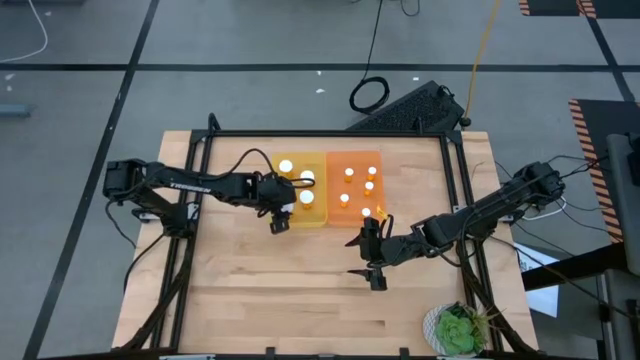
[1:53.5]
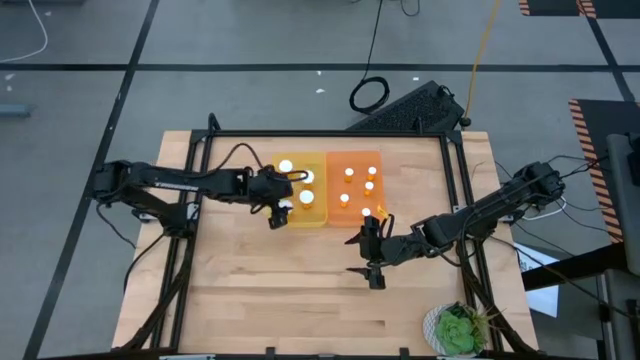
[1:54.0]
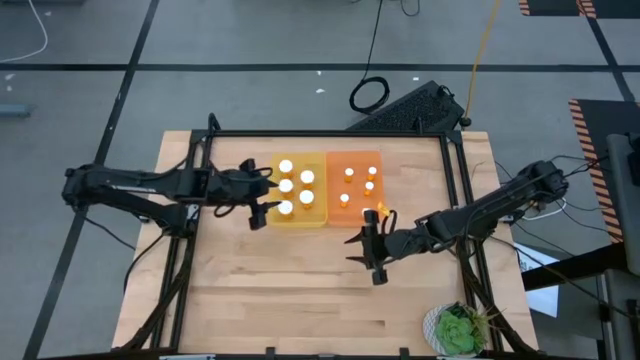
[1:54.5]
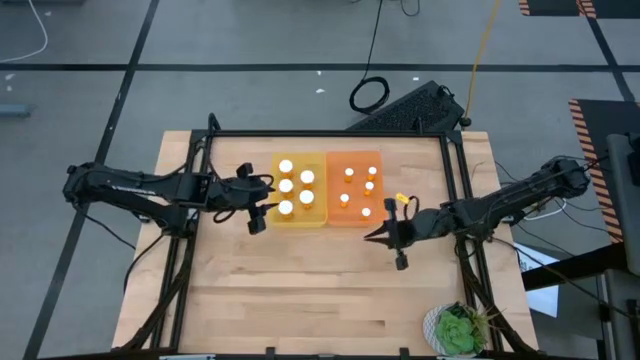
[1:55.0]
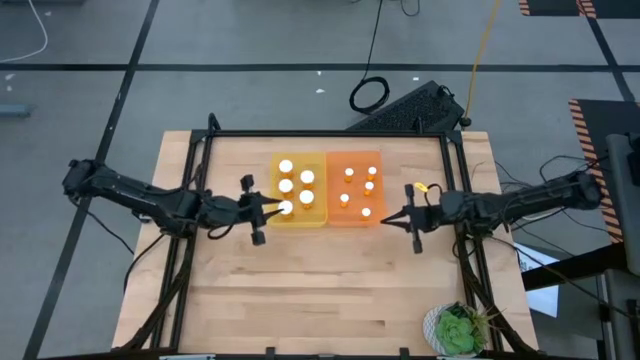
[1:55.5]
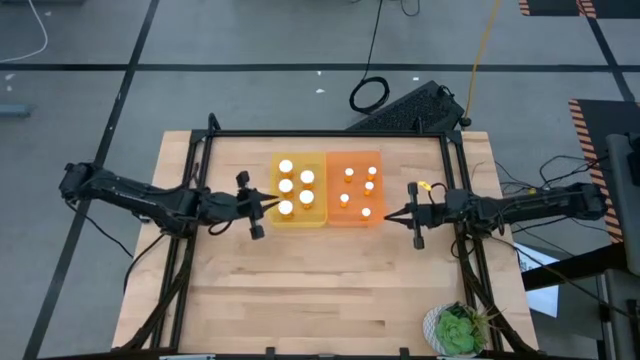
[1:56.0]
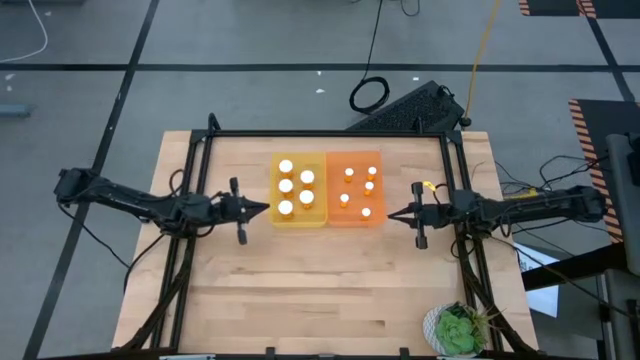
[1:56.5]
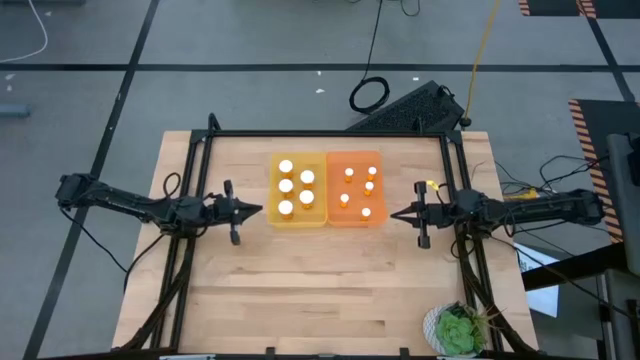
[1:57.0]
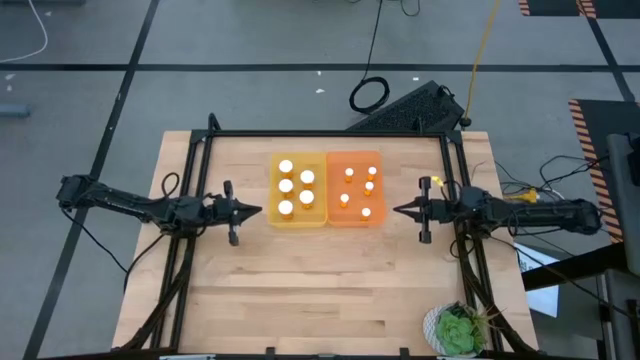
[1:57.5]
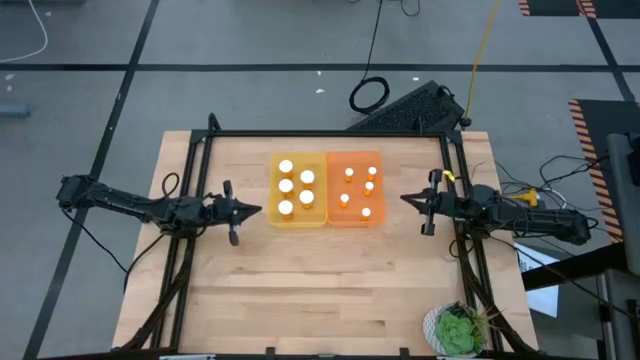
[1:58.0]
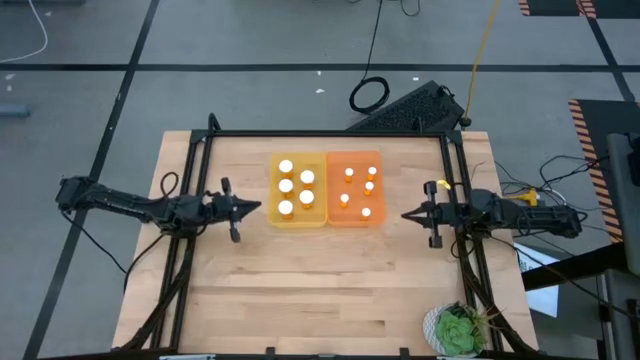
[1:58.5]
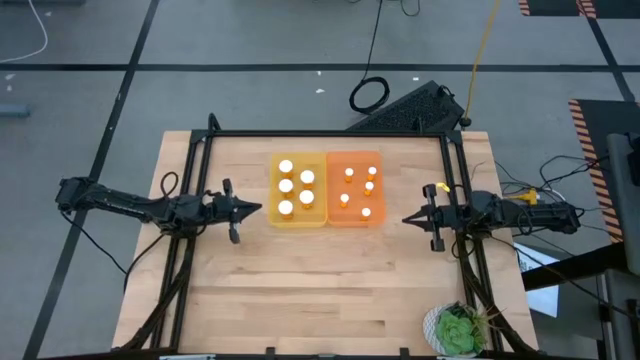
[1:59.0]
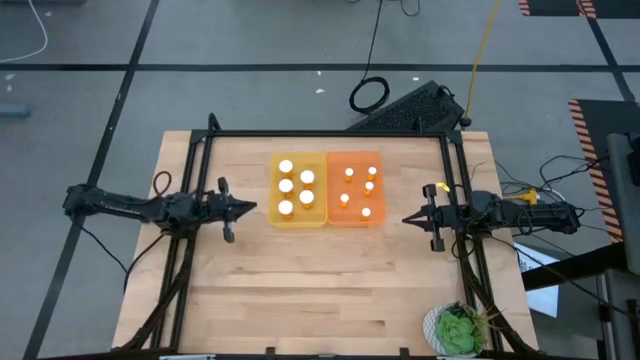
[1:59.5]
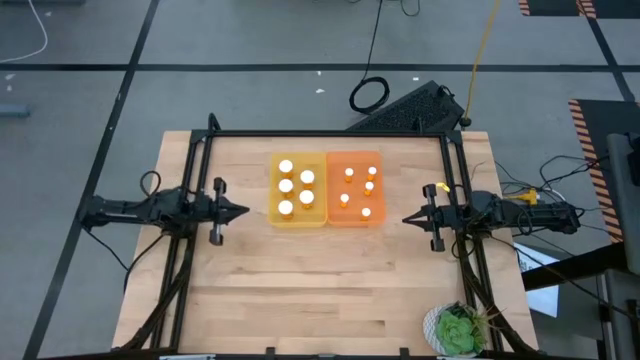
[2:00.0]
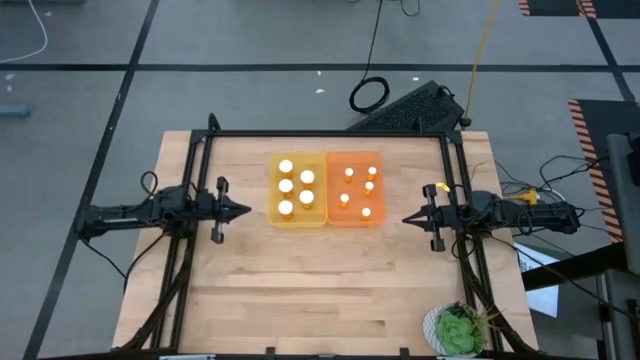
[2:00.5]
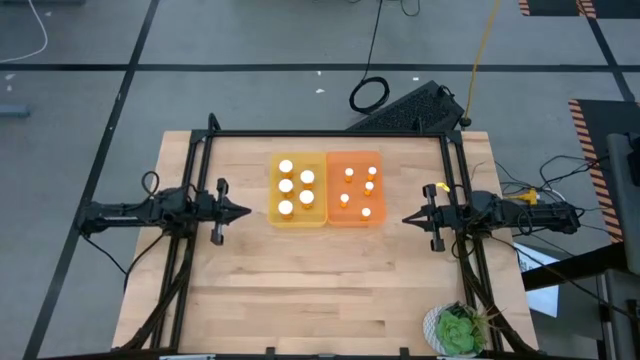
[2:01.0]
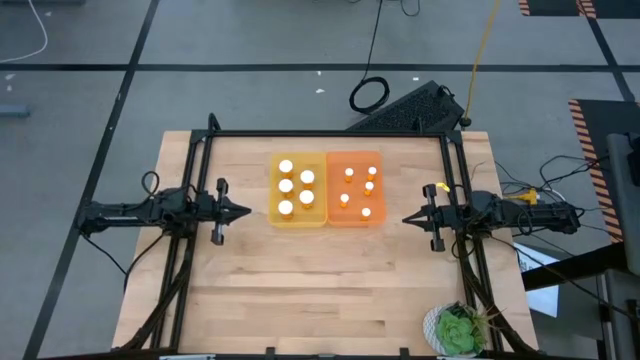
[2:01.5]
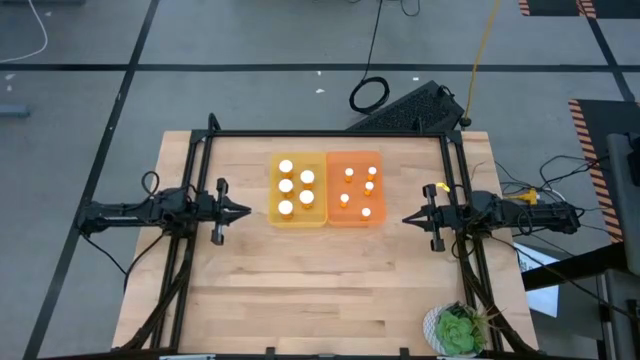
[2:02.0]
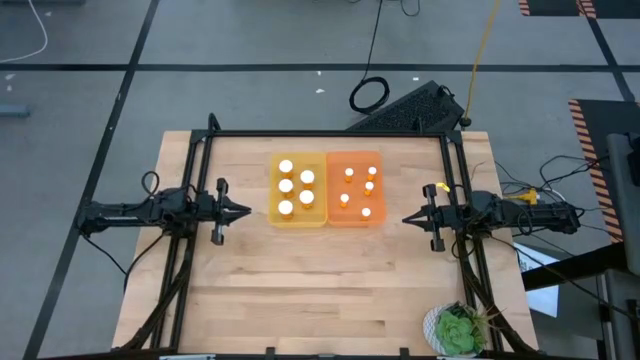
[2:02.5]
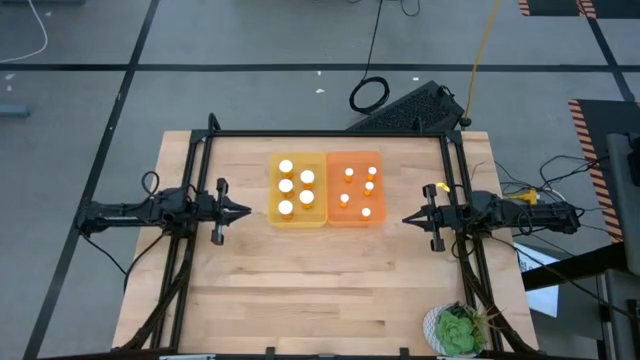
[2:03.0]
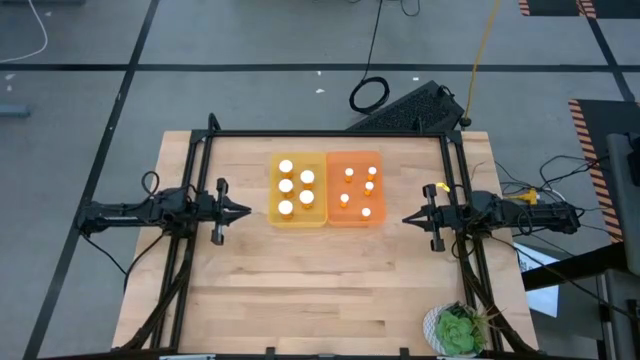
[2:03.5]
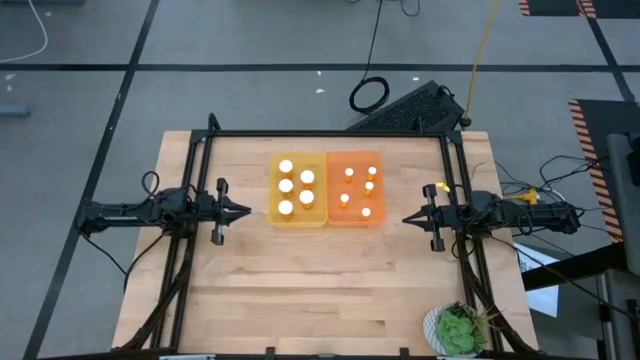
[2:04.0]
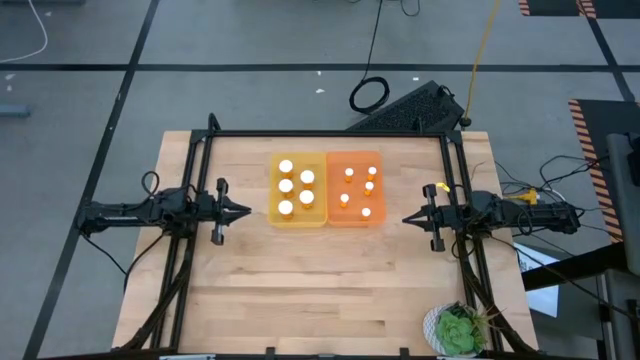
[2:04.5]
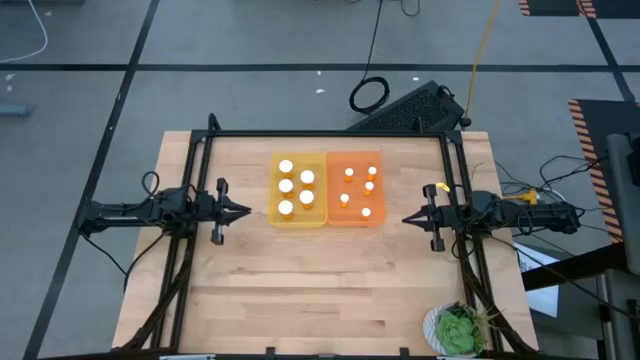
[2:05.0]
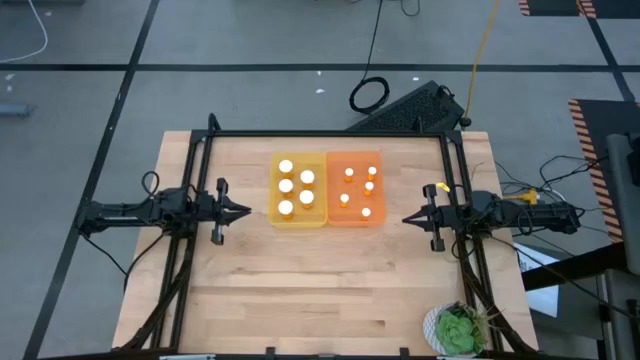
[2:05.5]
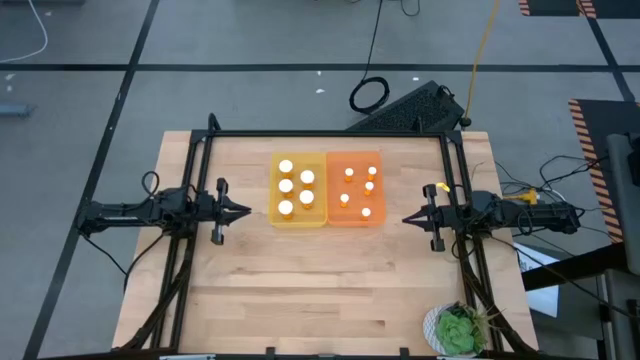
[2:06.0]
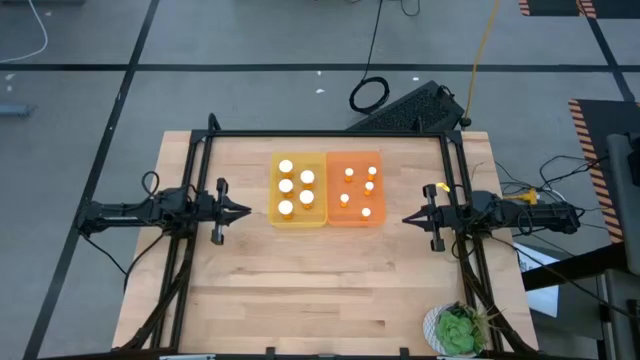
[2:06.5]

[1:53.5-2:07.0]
Task: Pick and place medicine bottles into bin by pill shape (circle, oval)
Return to Home Position

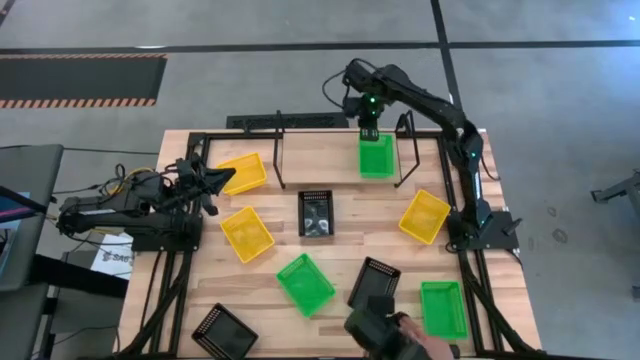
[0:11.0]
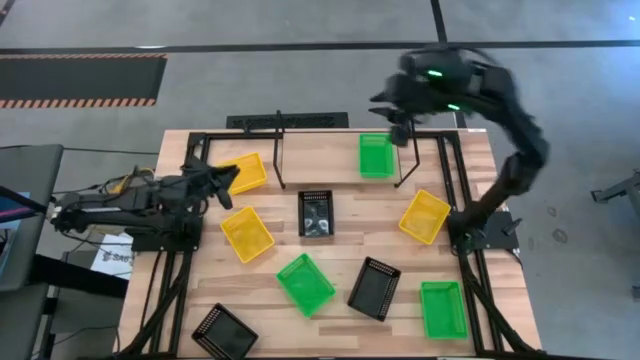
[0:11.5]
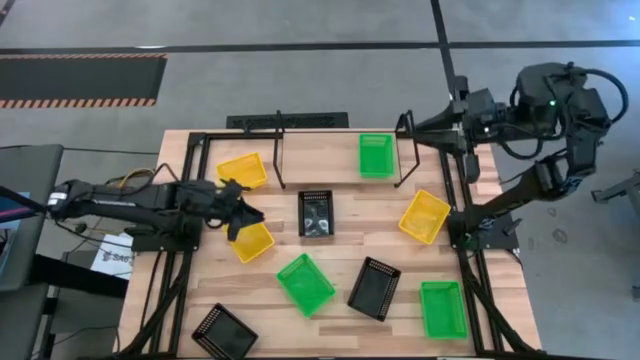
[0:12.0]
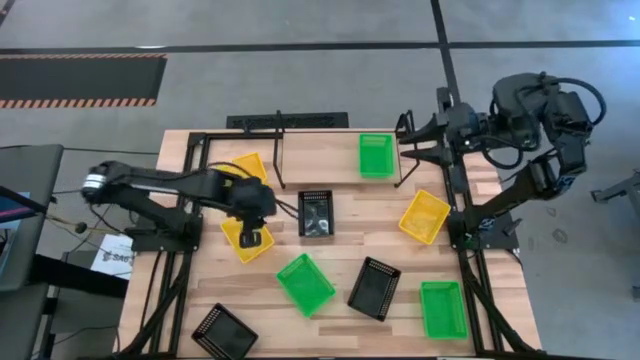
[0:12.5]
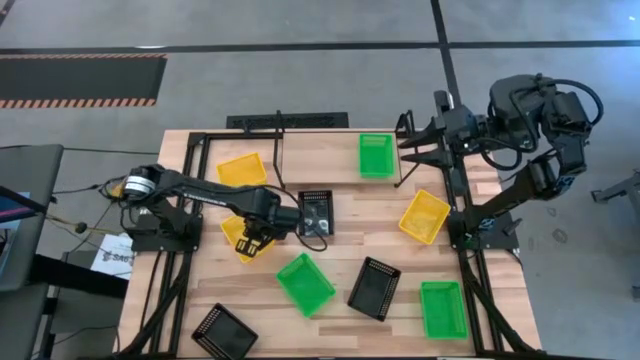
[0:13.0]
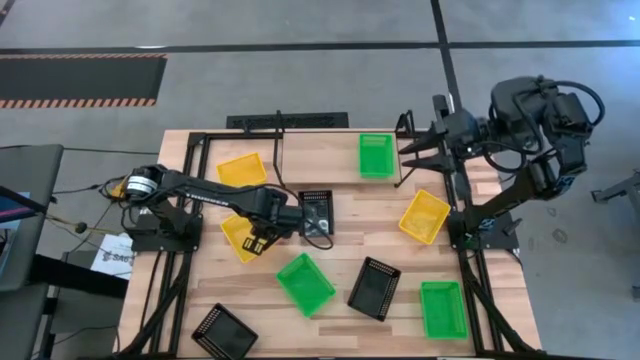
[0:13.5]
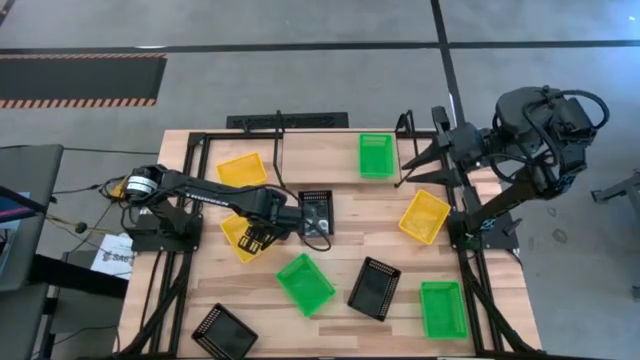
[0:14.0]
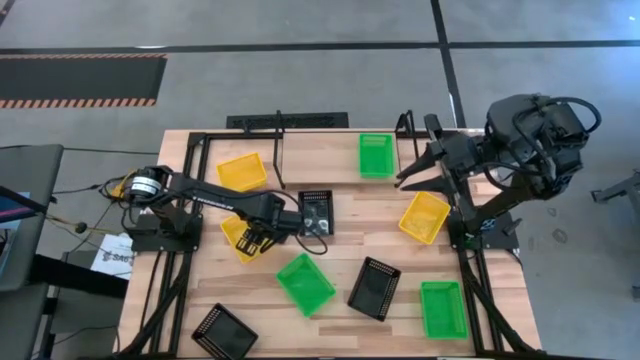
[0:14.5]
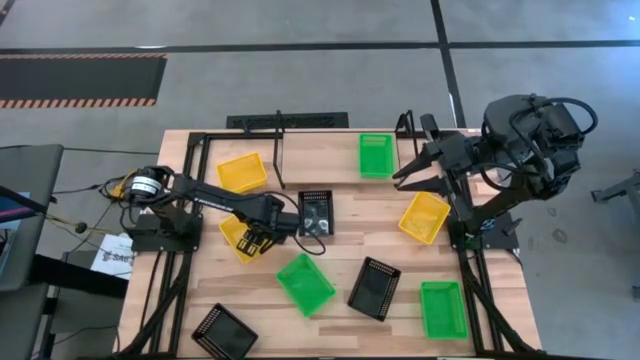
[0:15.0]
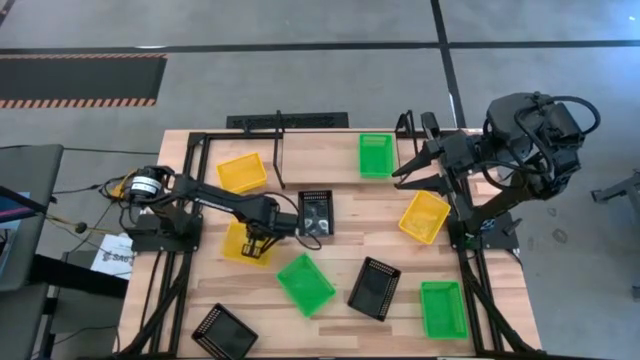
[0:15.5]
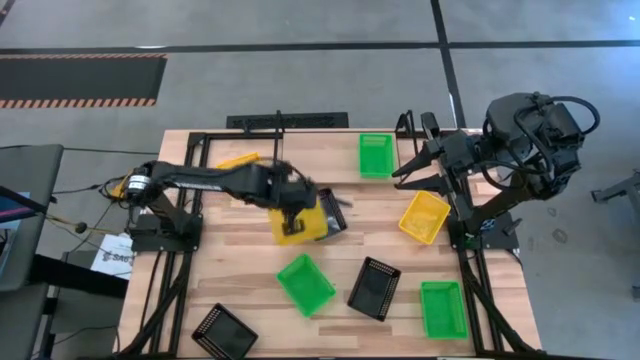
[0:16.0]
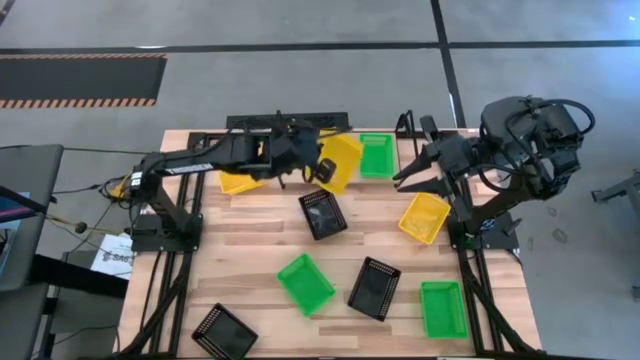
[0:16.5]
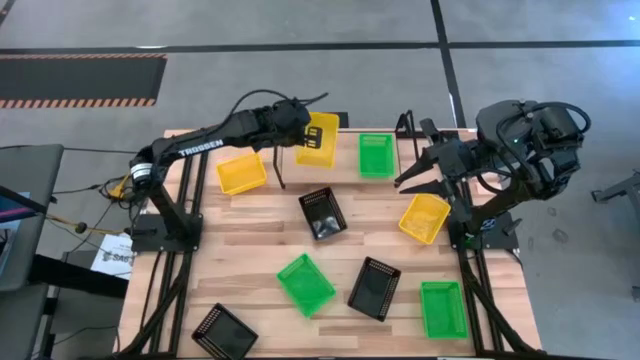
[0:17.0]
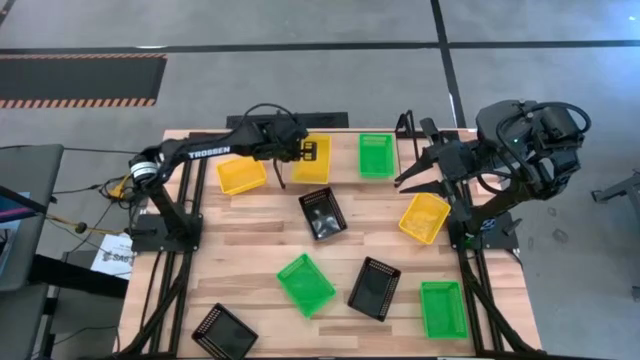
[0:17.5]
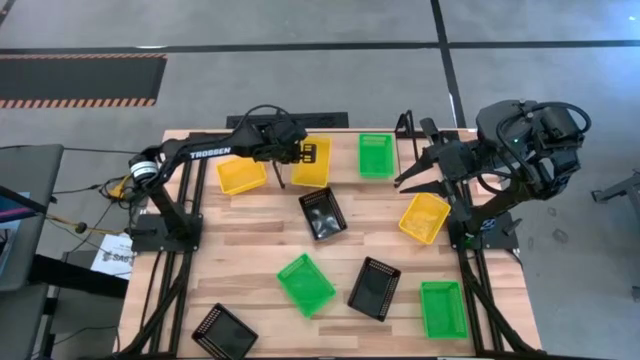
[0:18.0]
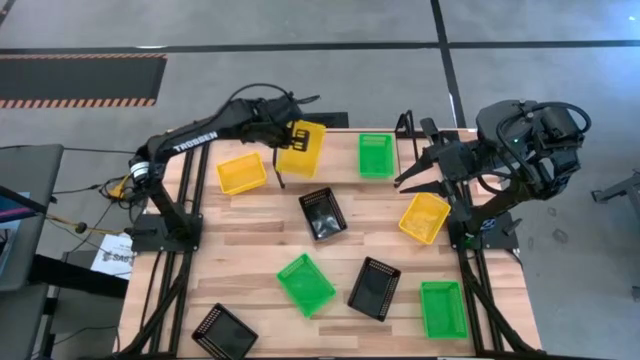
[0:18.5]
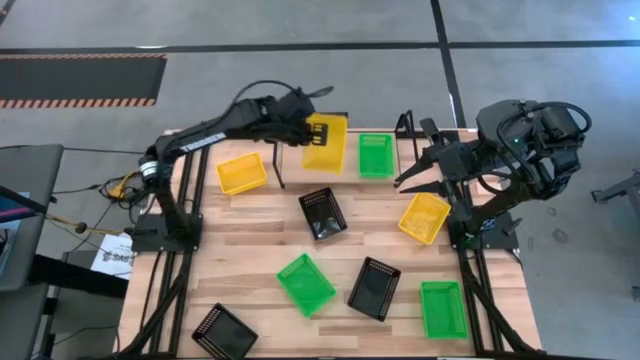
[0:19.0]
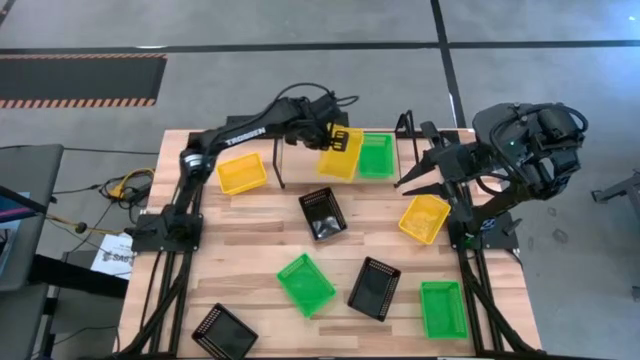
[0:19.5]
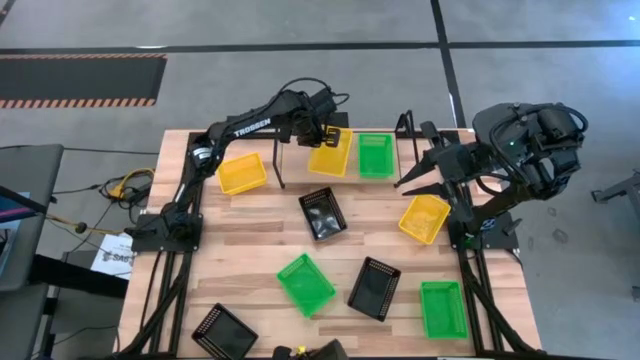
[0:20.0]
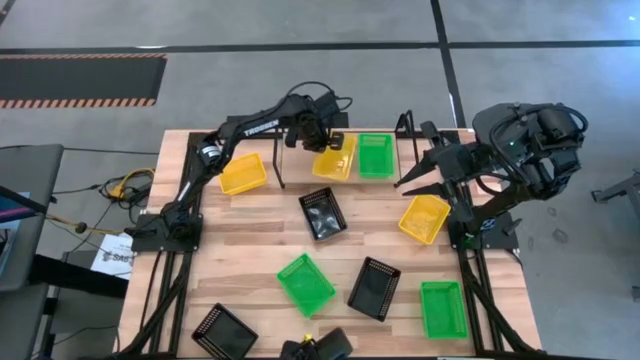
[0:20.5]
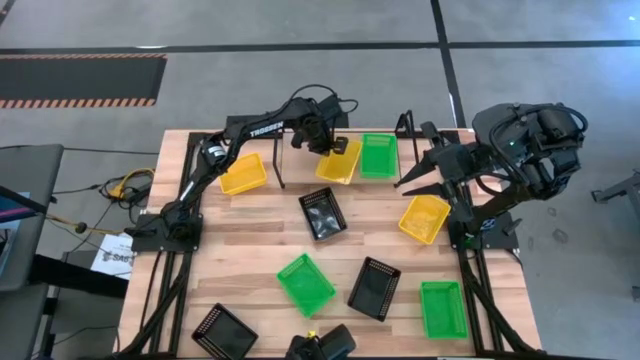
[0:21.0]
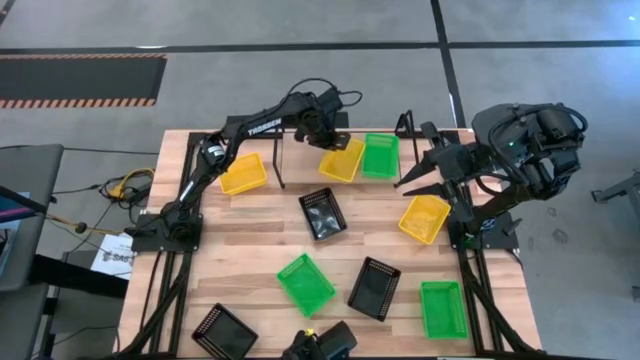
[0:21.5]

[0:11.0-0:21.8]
Task: Stack baskets on shelf by color
Put the bottom left yellow bin on the shelf
